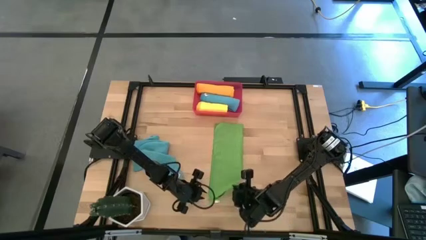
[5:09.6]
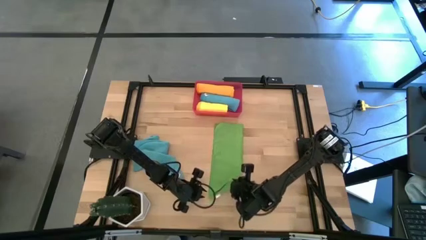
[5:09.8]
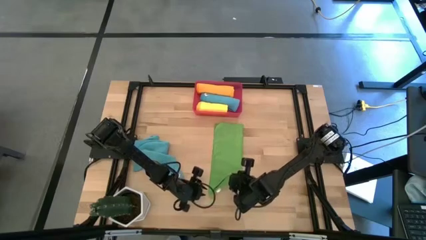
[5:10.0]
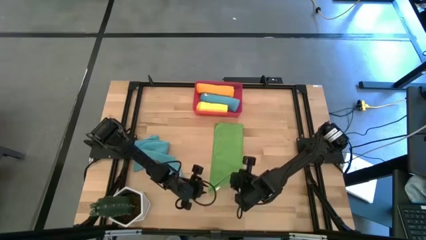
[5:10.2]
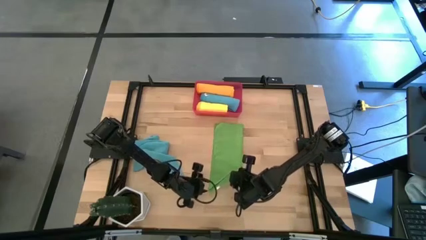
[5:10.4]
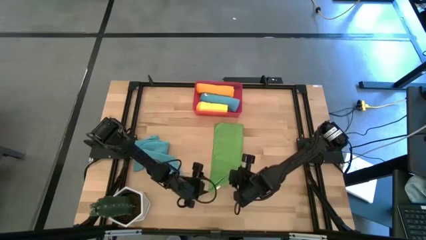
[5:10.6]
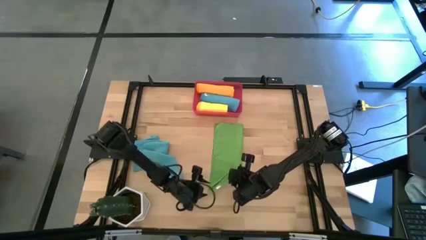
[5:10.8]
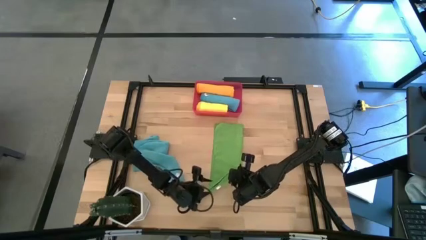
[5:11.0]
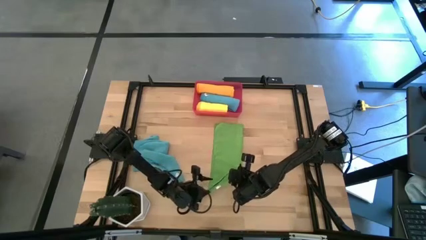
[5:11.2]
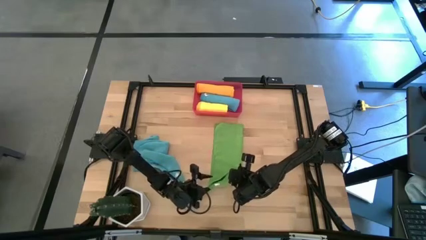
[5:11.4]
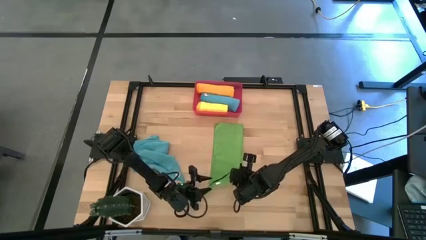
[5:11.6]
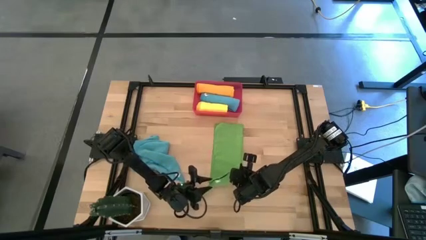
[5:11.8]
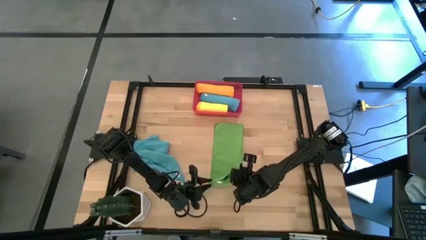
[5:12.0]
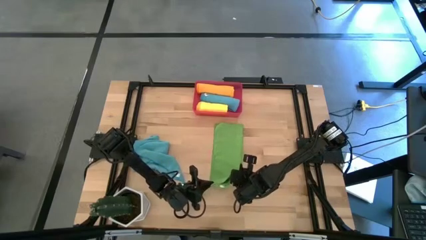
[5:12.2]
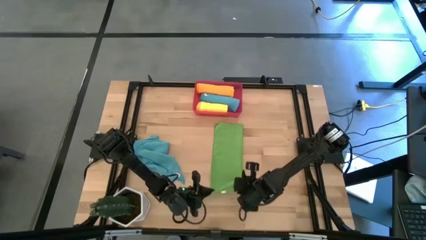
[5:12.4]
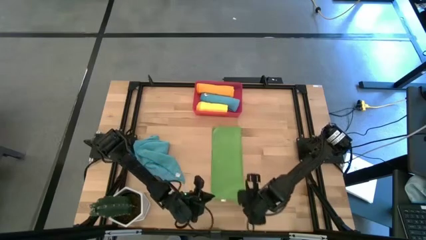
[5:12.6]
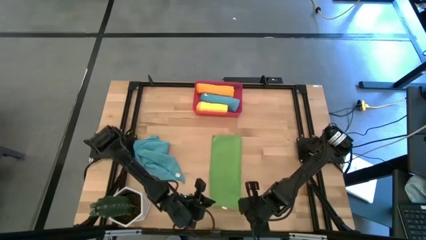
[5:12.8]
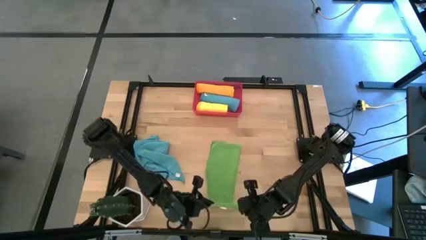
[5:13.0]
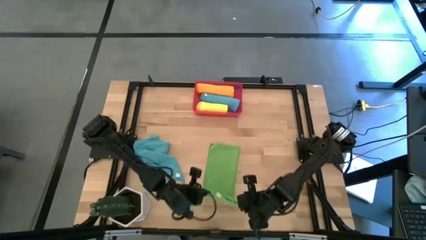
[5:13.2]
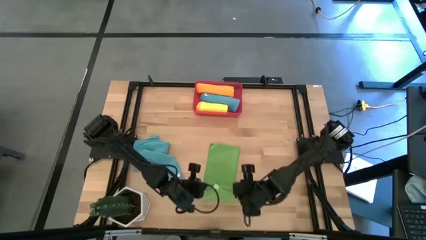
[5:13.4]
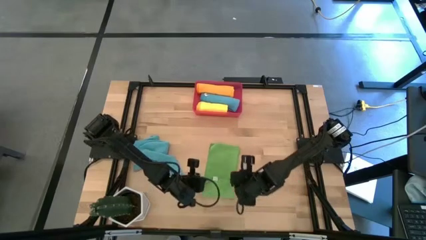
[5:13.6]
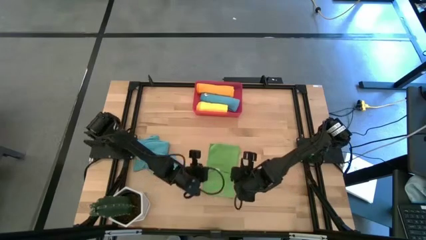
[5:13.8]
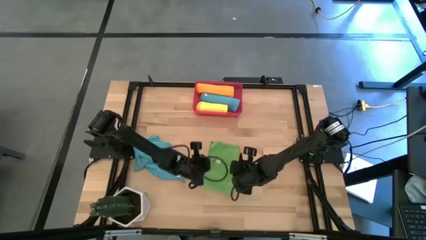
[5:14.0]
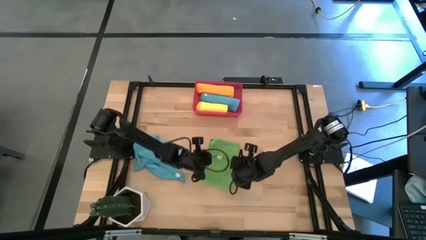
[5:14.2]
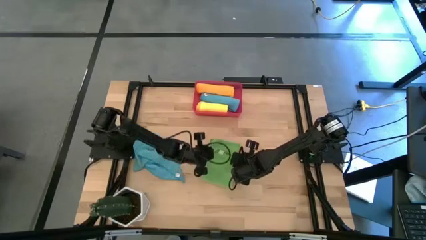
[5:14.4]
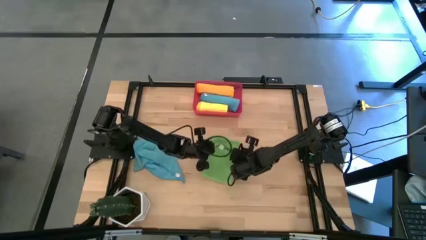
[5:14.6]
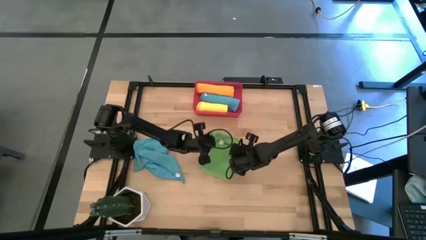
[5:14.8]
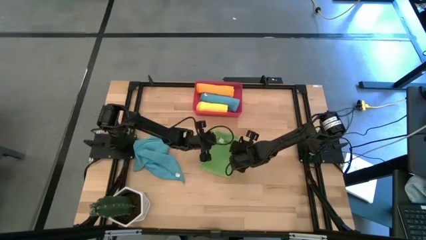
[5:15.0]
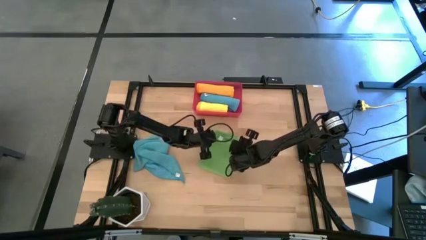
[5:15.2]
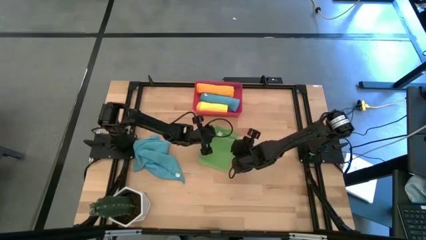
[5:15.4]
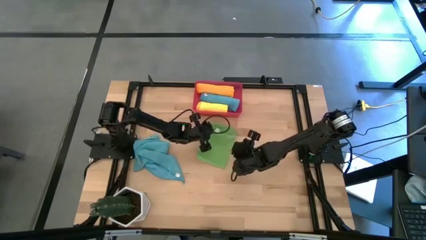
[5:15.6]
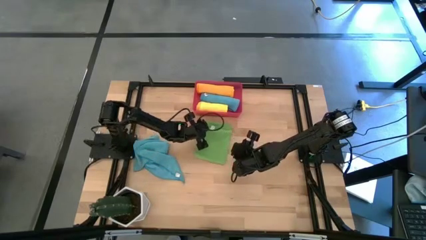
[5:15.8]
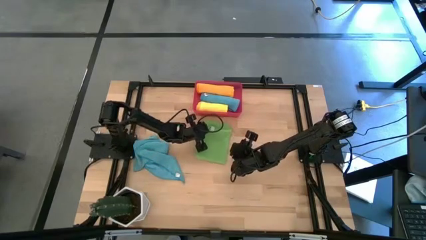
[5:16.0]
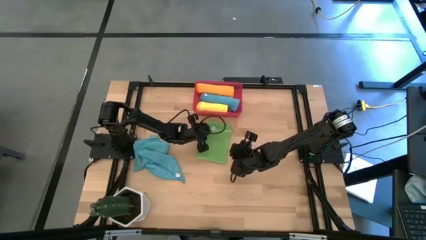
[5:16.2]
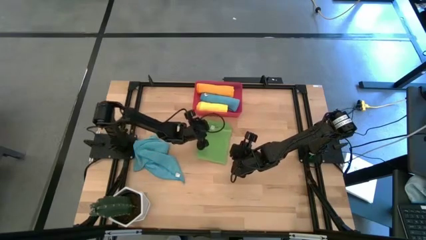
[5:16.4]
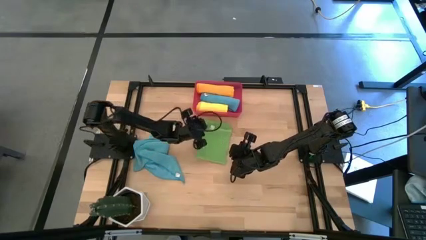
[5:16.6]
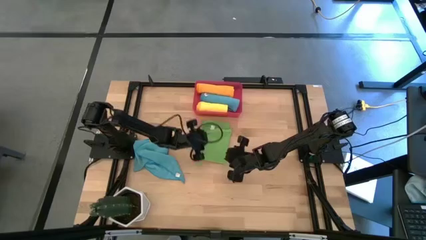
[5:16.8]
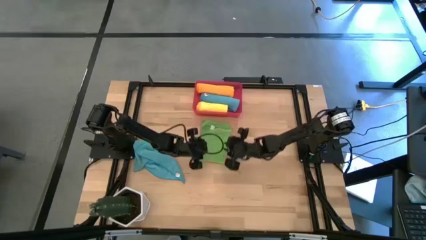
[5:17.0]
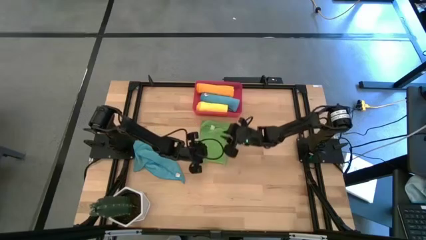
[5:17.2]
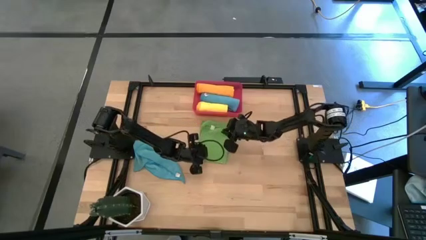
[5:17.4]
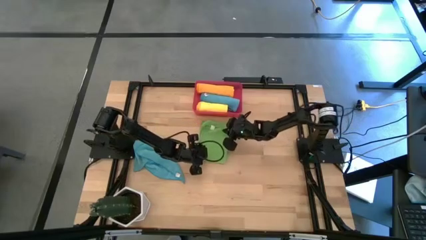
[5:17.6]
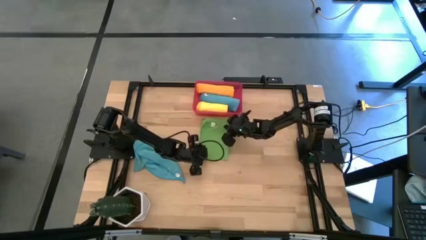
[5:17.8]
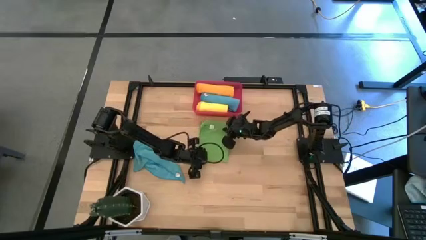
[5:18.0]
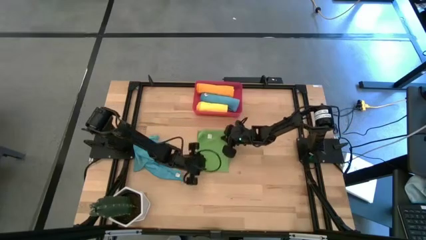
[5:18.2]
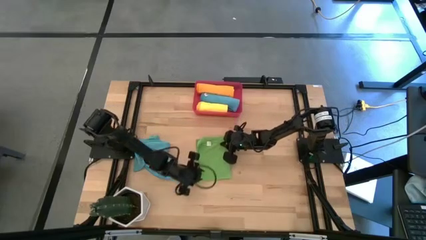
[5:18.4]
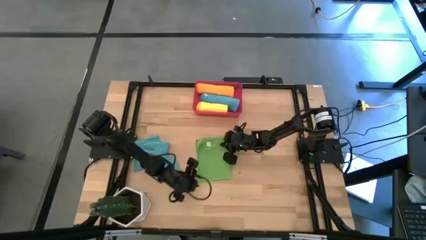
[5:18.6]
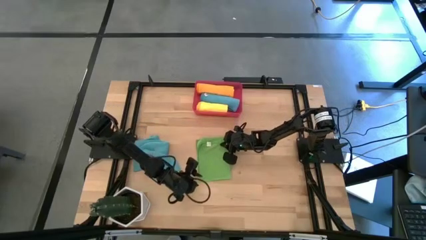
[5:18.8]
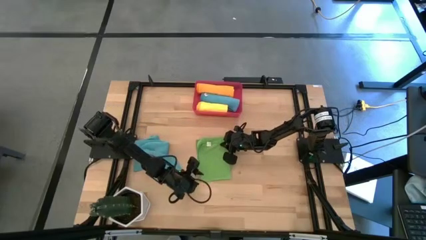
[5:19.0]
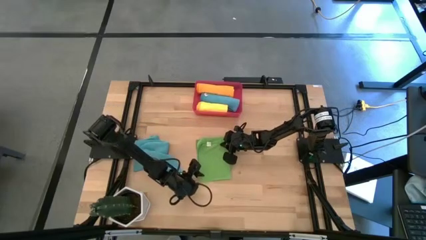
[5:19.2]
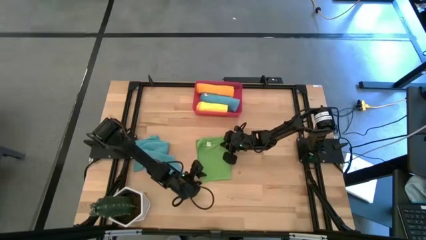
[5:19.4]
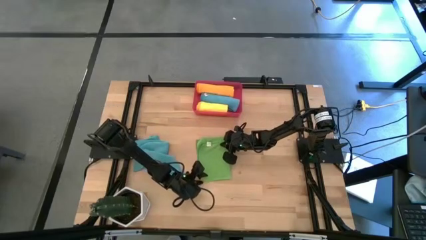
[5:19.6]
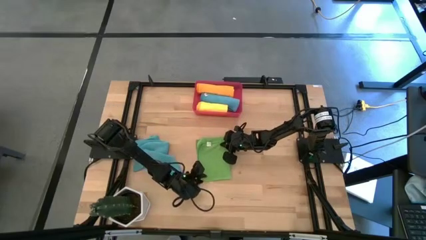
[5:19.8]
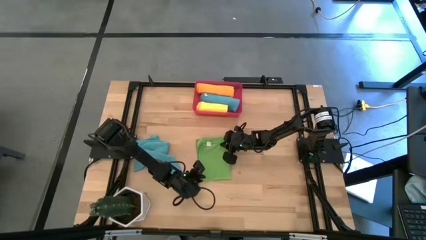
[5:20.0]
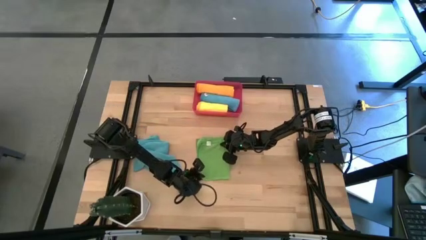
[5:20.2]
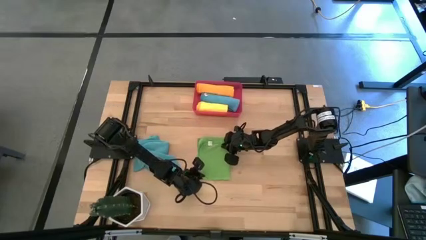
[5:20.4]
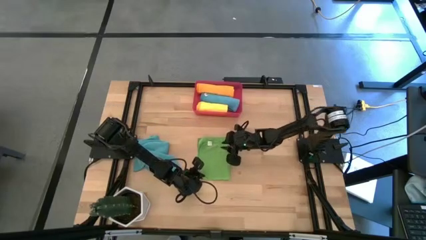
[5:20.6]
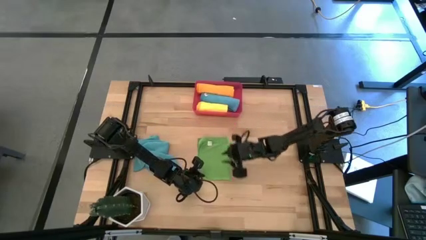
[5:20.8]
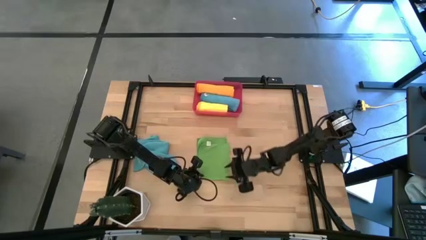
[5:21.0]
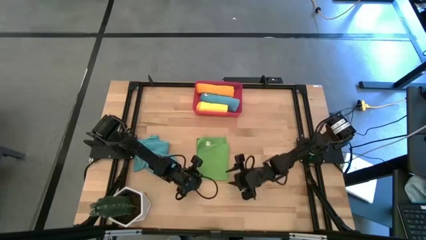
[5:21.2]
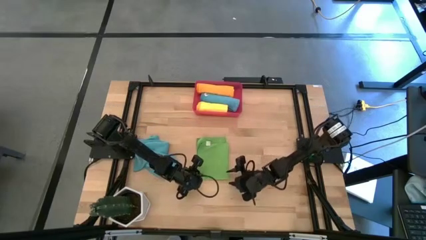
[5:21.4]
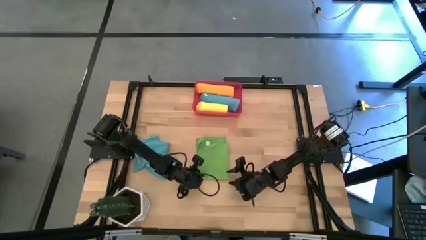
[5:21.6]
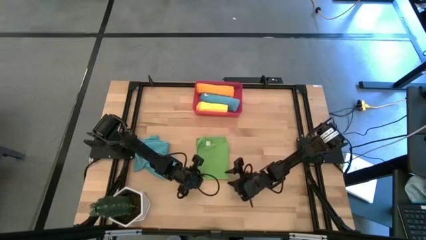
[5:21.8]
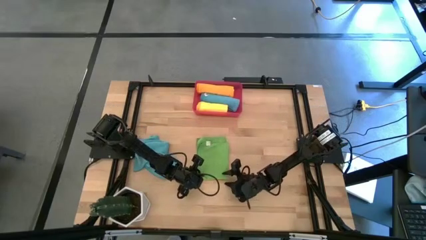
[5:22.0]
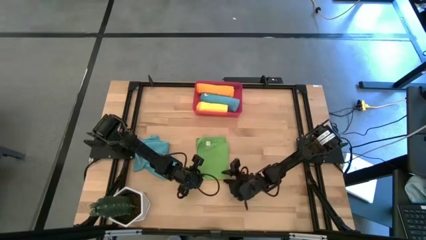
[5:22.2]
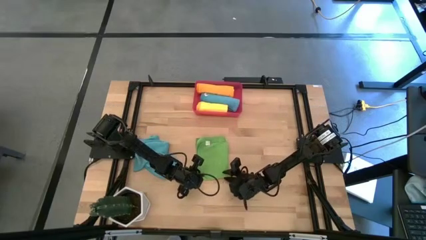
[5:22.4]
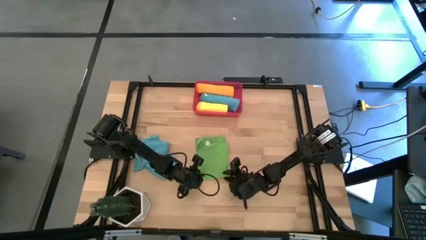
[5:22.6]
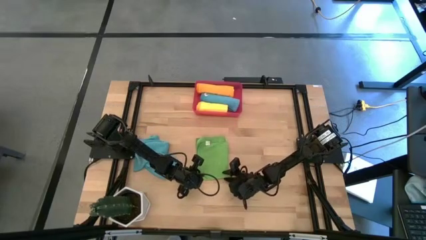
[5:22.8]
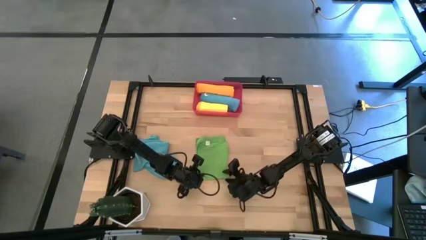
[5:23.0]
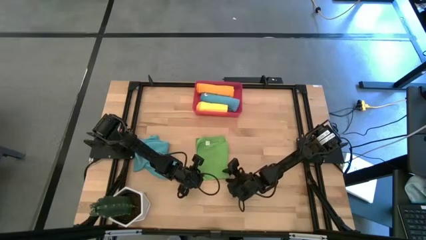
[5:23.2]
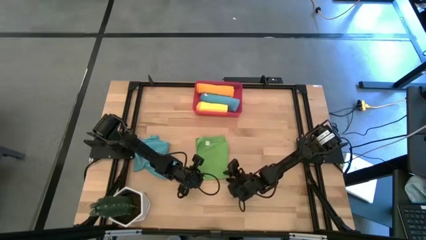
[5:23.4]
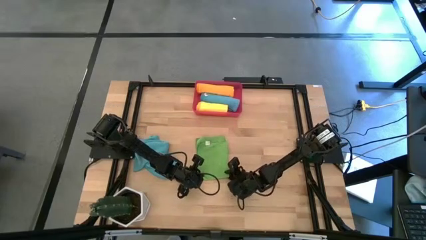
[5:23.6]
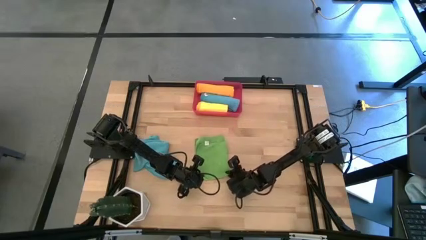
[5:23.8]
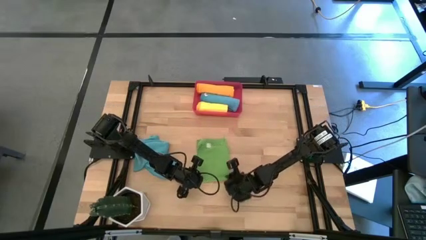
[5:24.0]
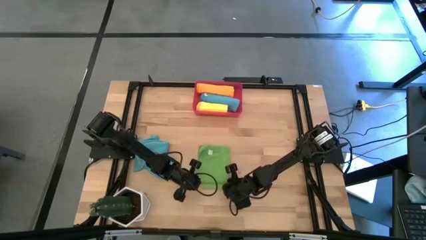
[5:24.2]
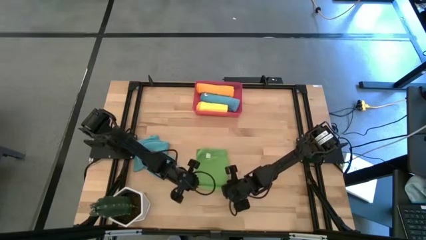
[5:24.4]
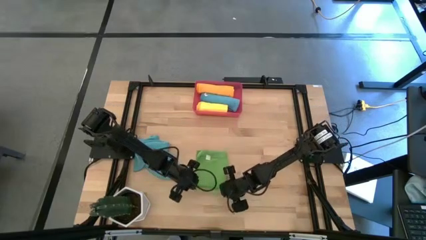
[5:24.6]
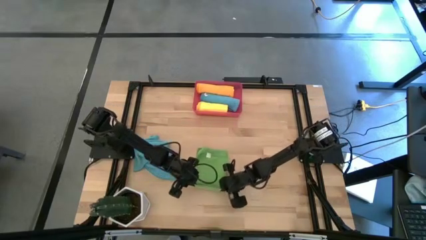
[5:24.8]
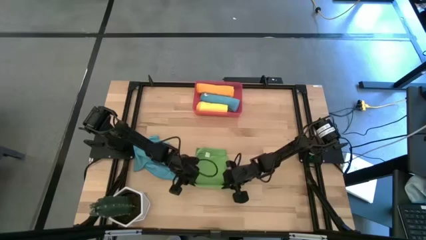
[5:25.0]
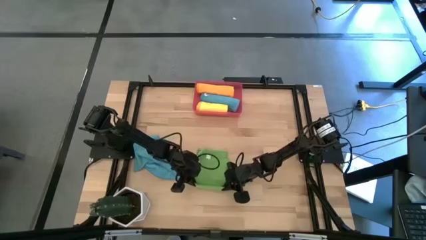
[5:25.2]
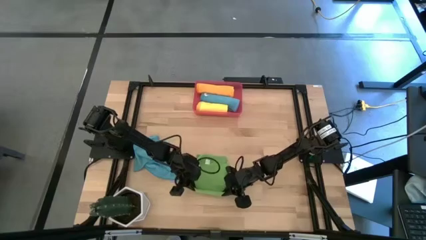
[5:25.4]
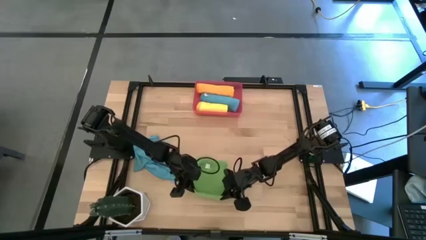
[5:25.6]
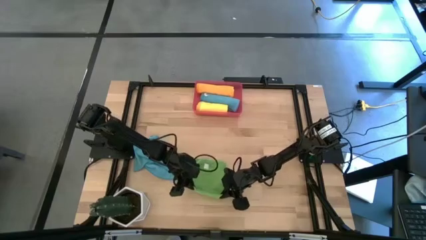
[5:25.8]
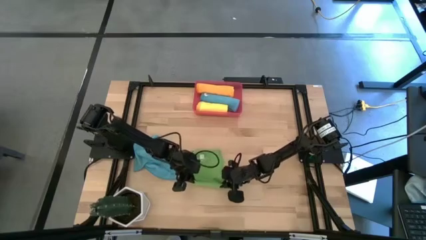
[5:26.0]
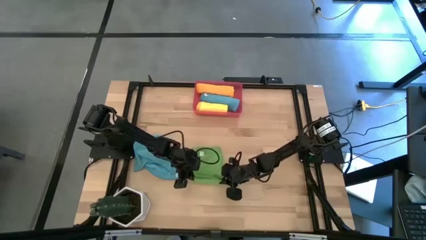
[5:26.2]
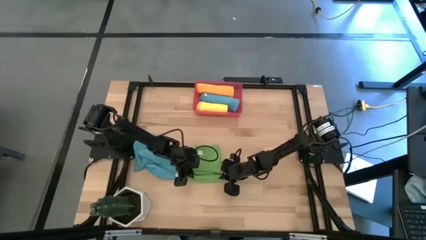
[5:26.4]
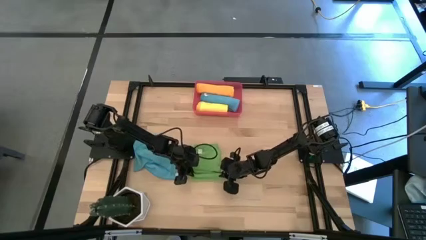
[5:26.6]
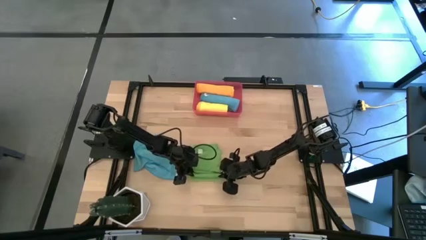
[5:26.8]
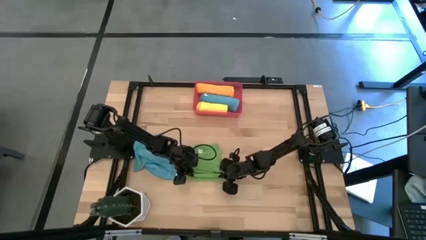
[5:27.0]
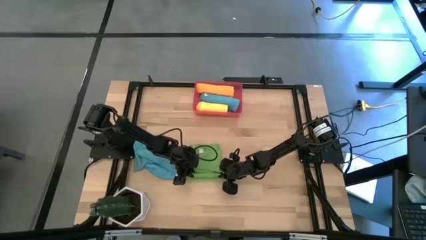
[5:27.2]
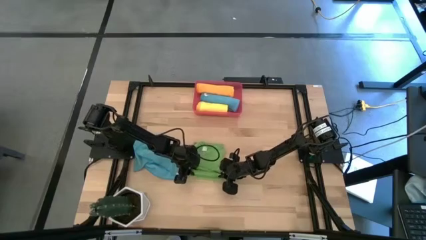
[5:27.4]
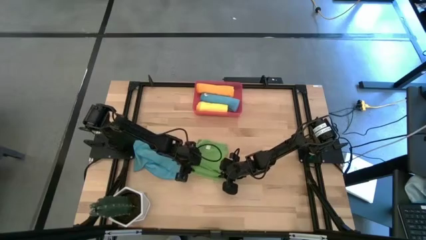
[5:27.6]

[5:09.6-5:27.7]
Task: Roll microfiber towels into tight, uniform cylinder then place into a basket
Roll the green microfiber cloth
